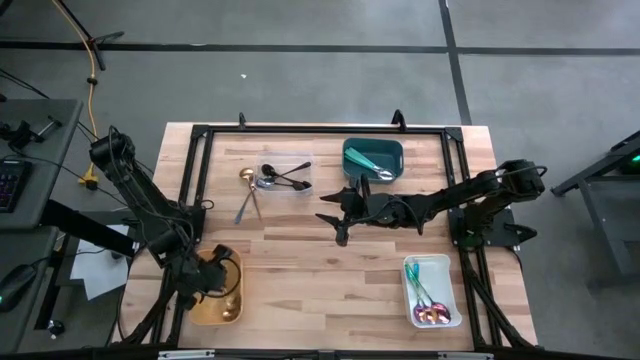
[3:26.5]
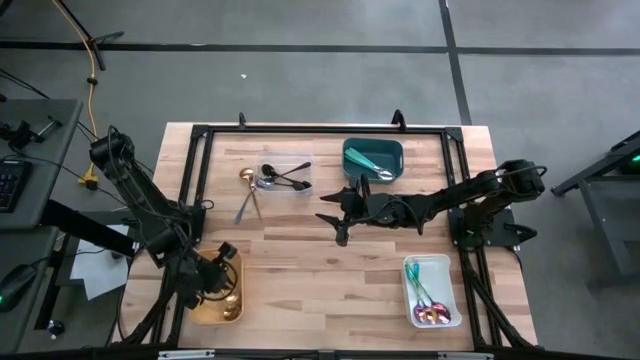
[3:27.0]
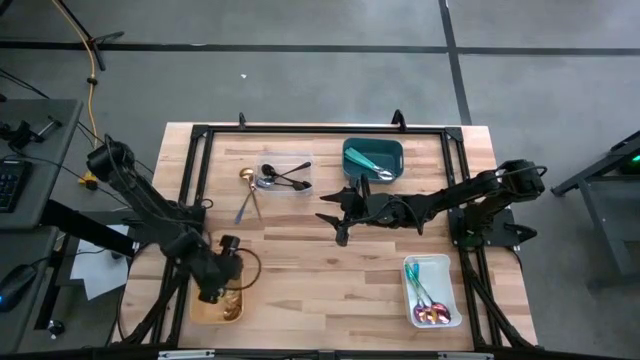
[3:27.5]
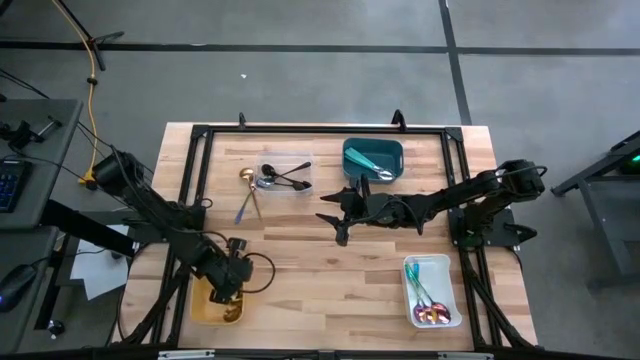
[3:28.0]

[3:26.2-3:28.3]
Task: Sort silverware by color (type)
Adjust the yellow bin

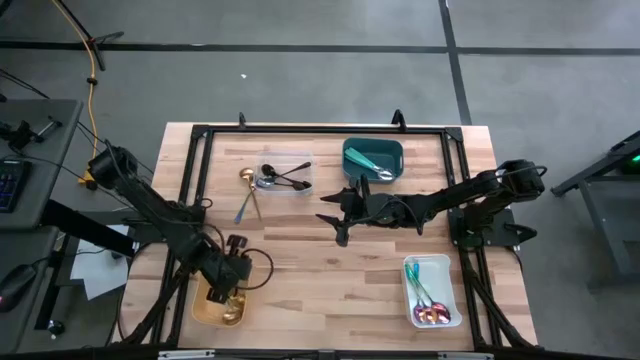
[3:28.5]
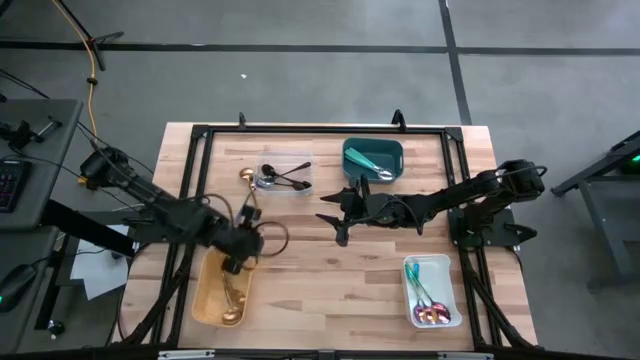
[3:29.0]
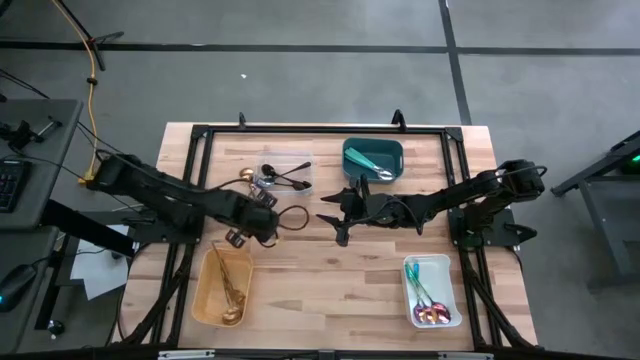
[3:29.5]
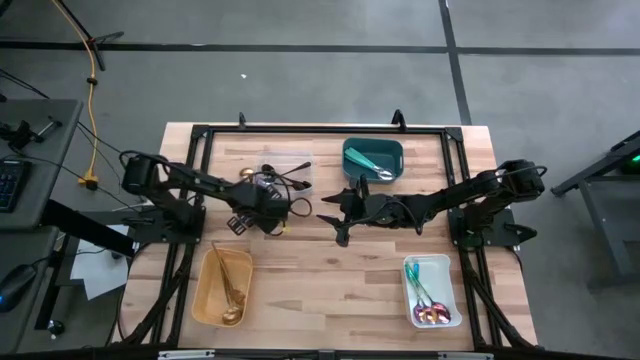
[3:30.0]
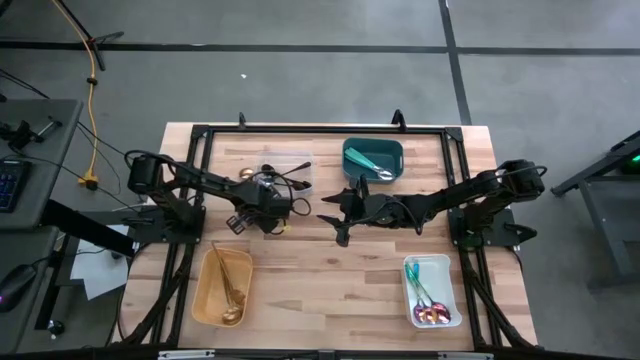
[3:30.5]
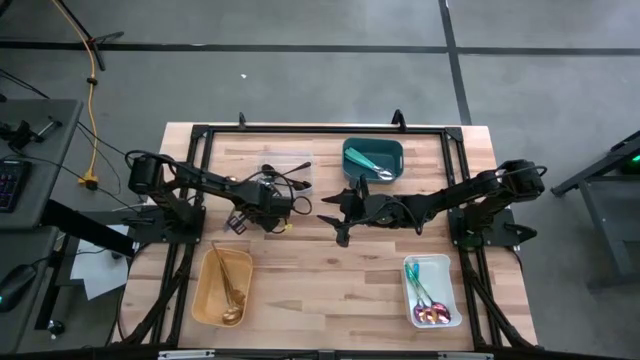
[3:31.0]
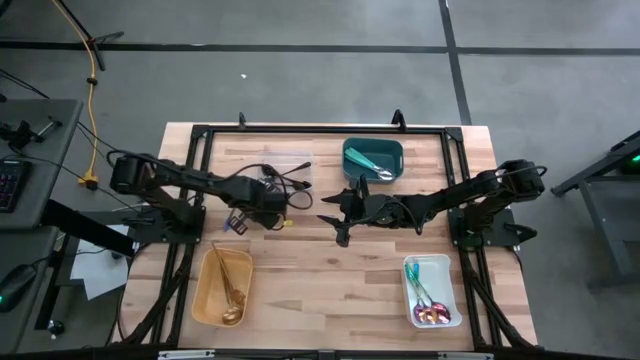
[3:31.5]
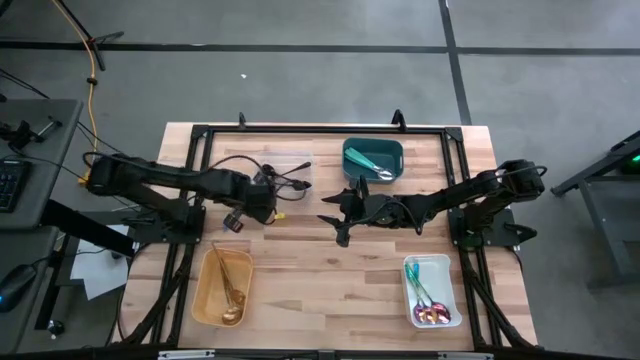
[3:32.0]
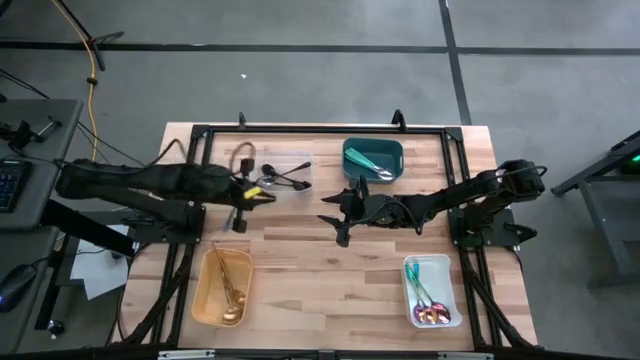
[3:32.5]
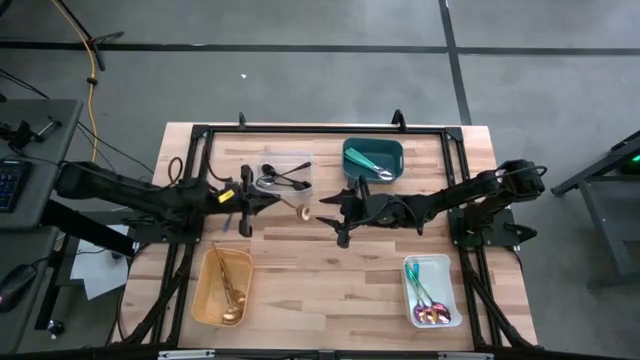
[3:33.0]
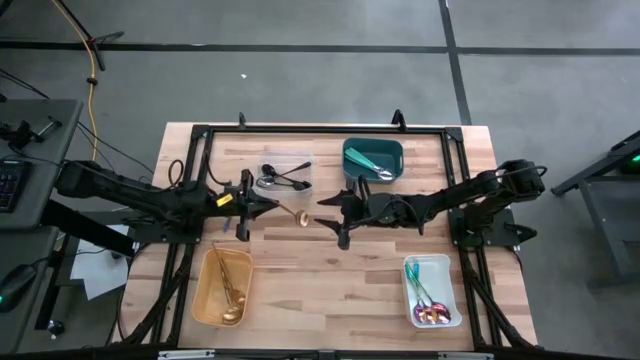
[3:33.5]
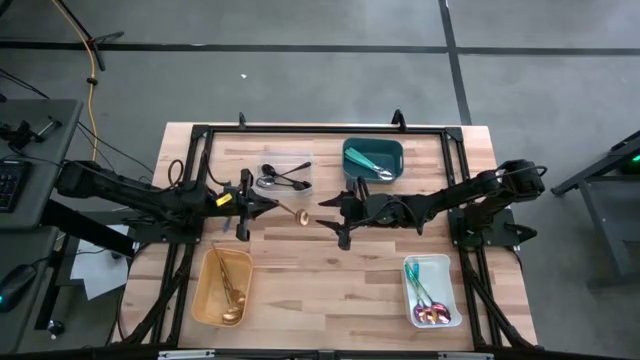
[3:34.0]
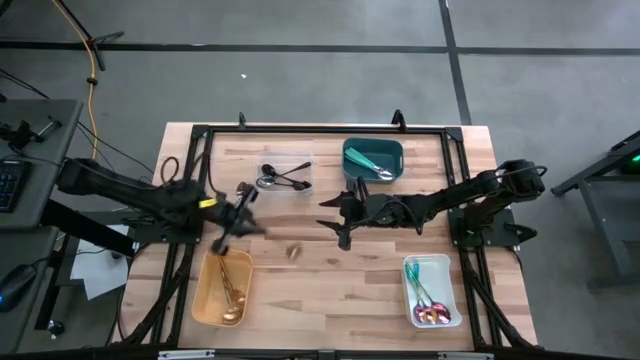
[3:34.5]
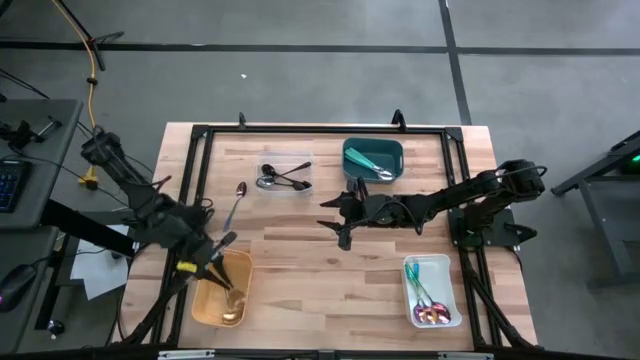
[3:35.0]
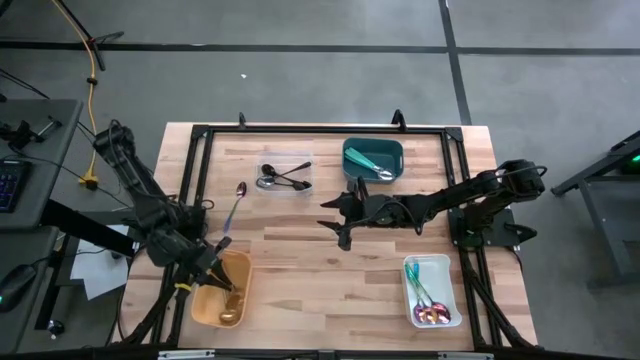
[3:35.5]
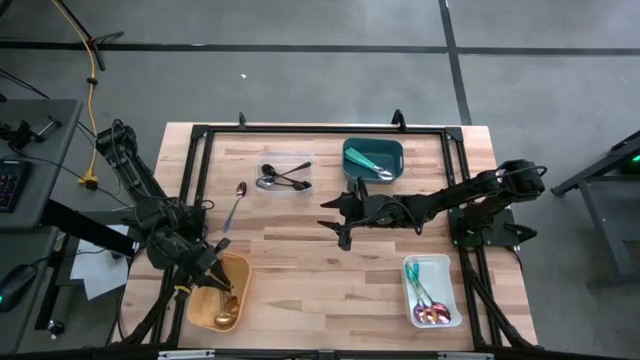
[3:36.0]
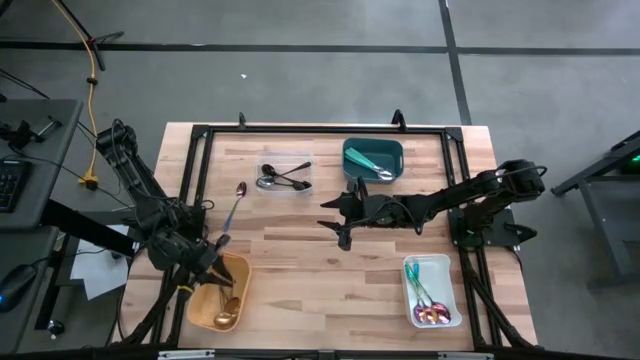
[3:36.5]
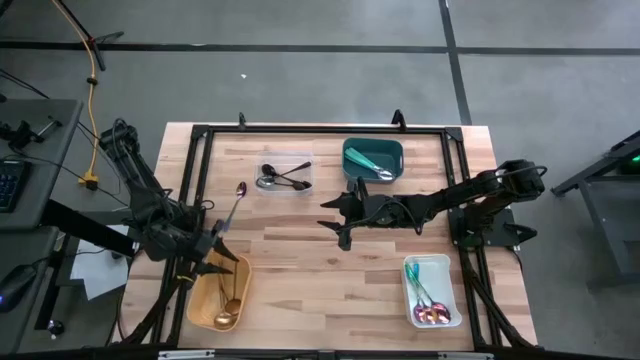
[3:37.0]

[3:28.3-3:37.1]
Put the gold spoon into the yellow bin

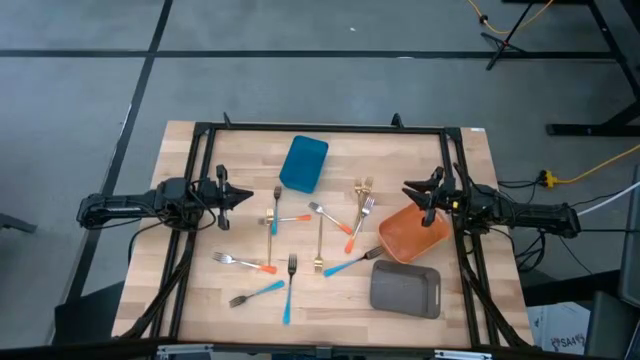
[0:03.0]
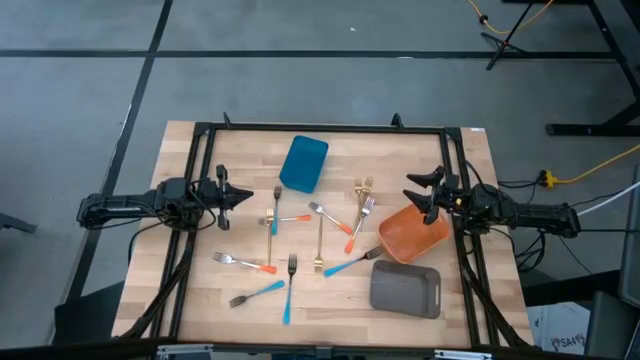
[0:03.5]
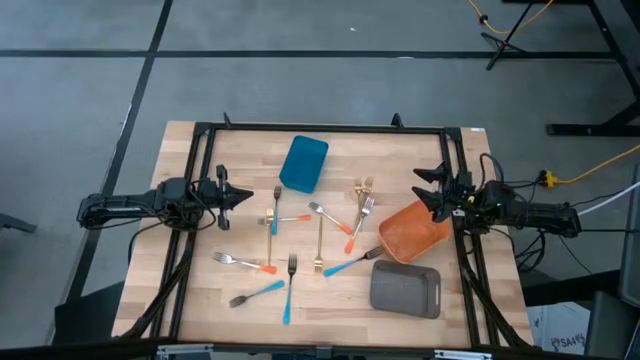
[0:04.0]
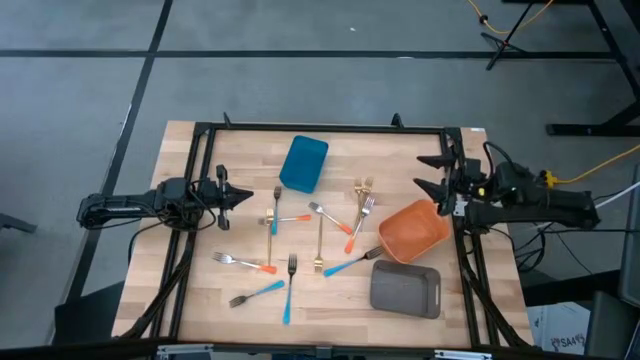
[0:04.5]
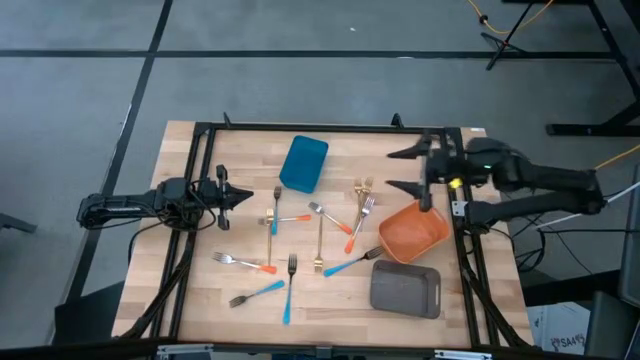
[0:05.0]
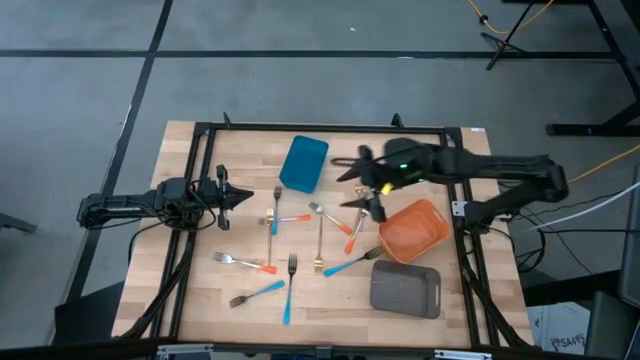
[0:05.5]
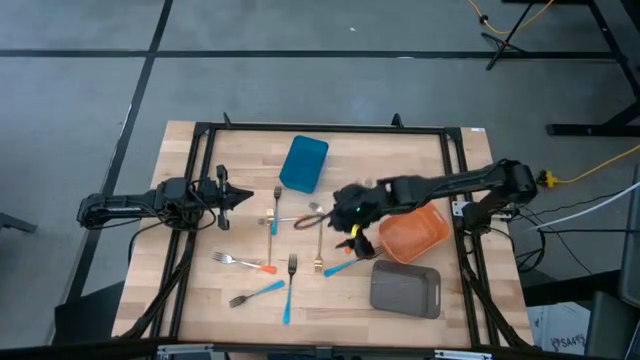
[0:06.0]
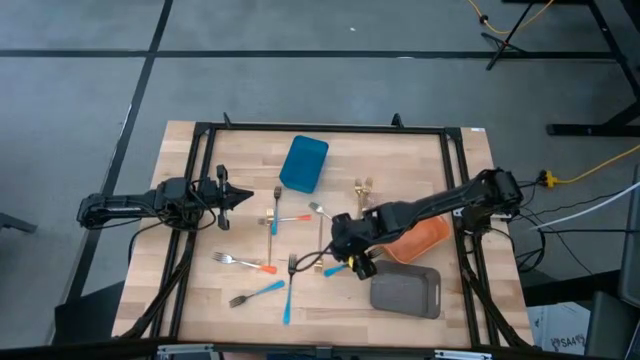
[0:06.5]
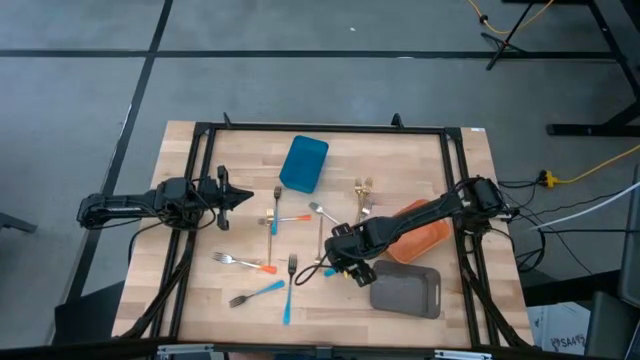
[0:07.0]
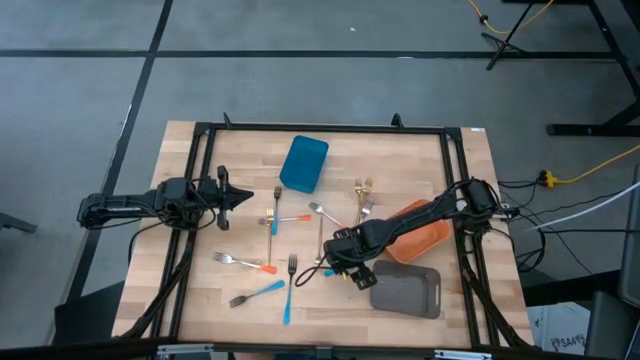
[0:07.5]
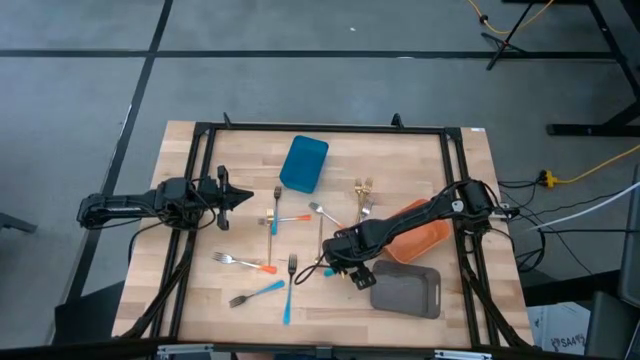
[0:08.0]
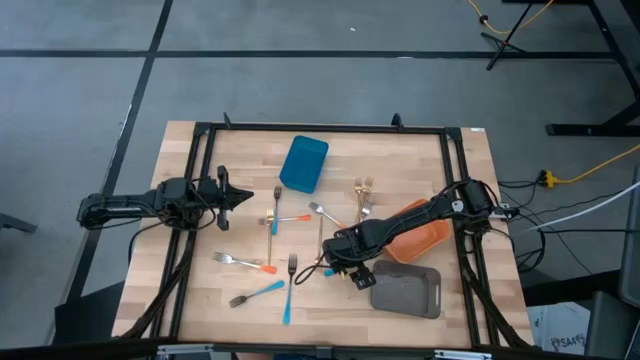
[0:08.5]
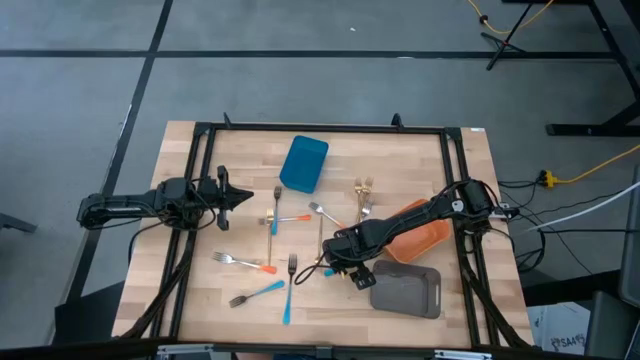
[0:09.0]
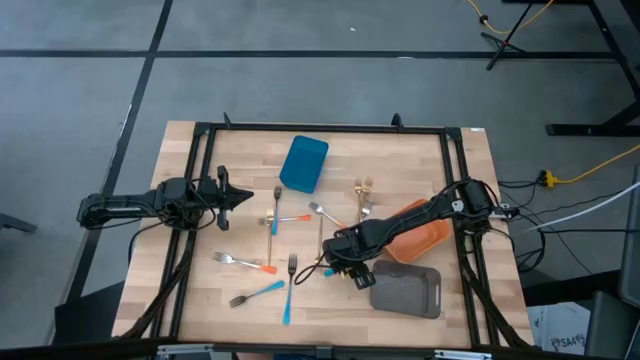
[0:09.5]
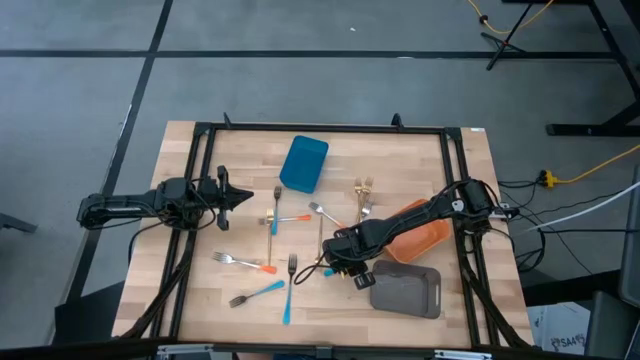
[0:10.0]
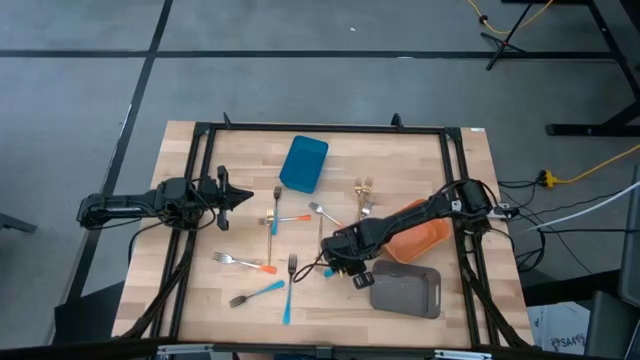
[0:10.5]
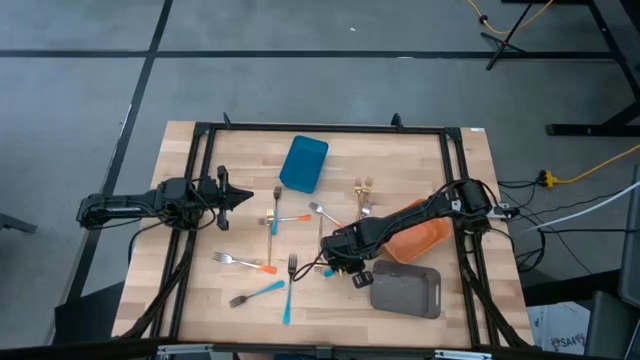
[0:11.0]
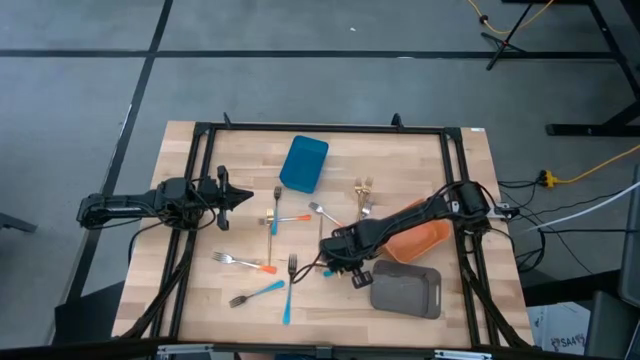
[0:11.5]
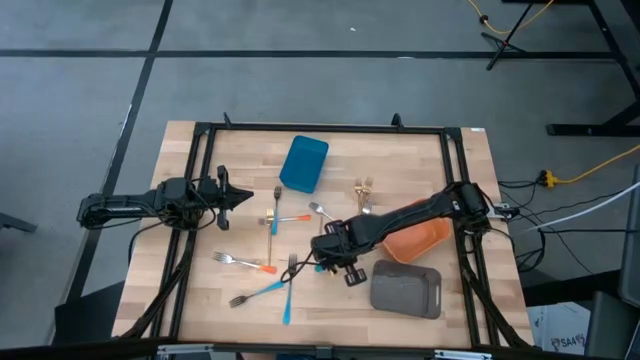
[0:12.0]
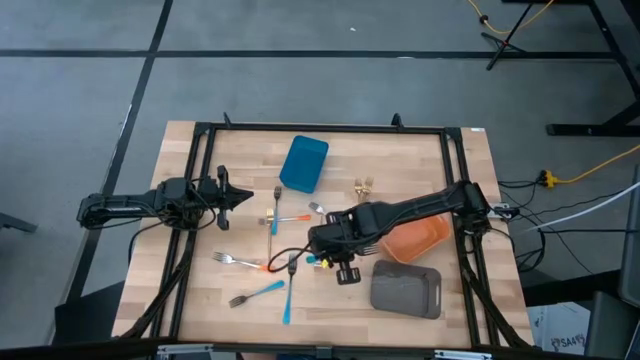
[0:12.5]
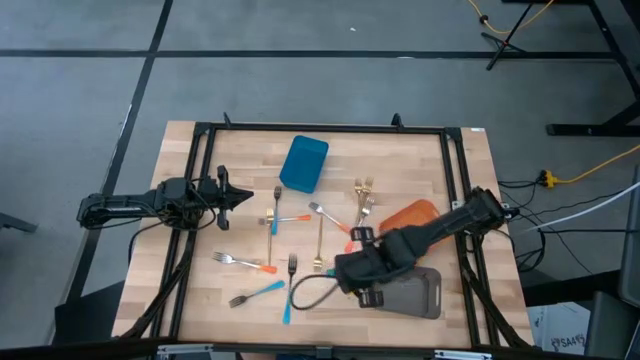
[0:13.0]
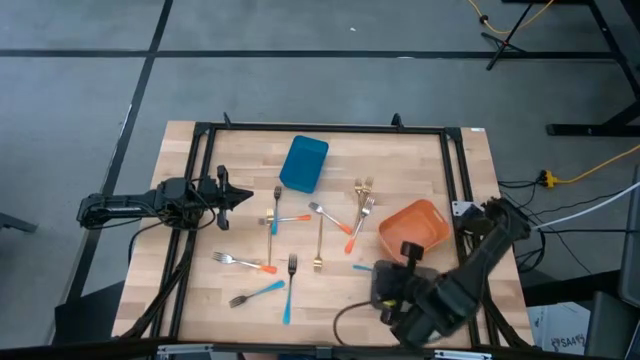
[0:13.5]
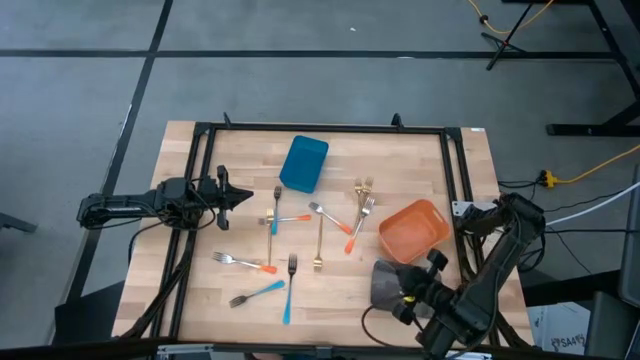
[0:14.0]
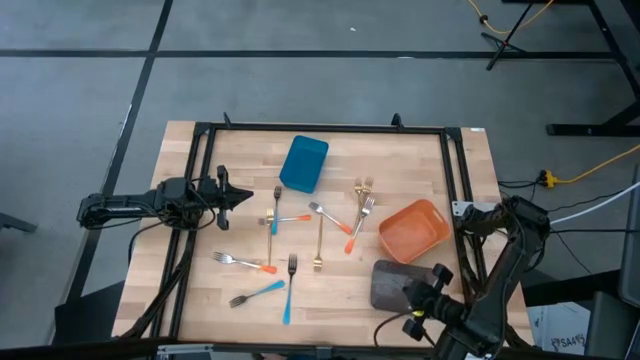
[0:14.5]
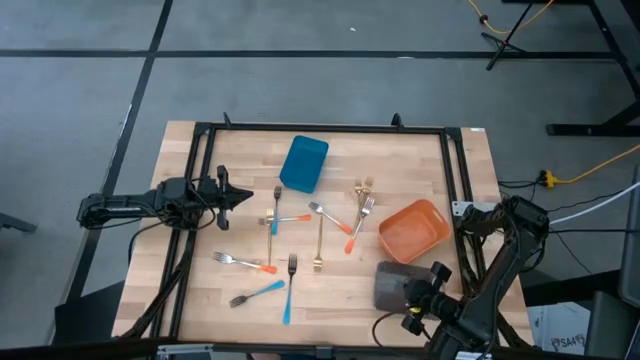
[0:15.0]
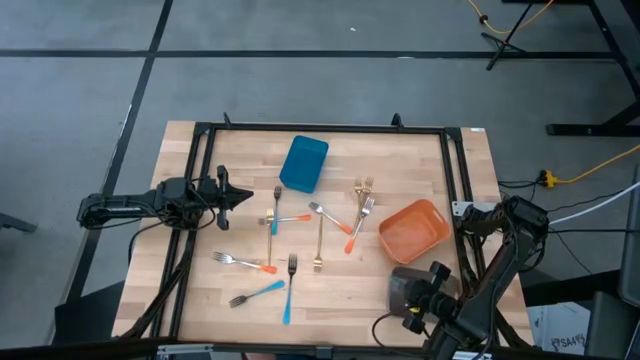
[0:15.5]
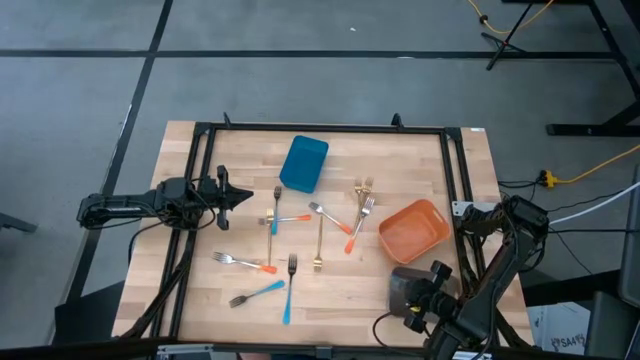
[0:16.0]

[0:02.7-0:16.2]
Task: Sort silverware by color (type)
Put the right blue fork into the black bin
